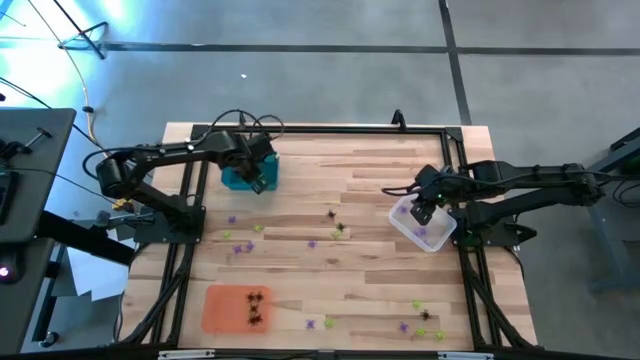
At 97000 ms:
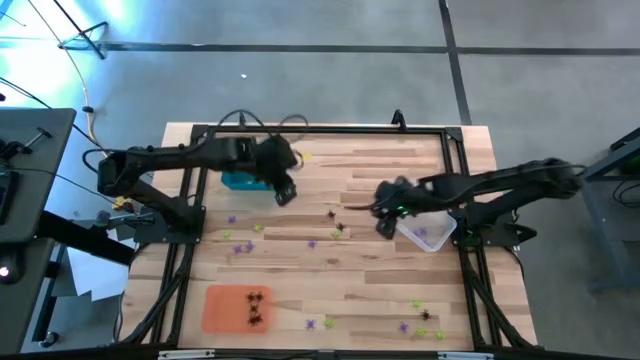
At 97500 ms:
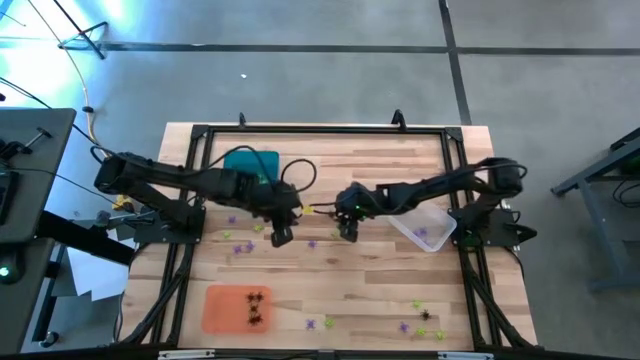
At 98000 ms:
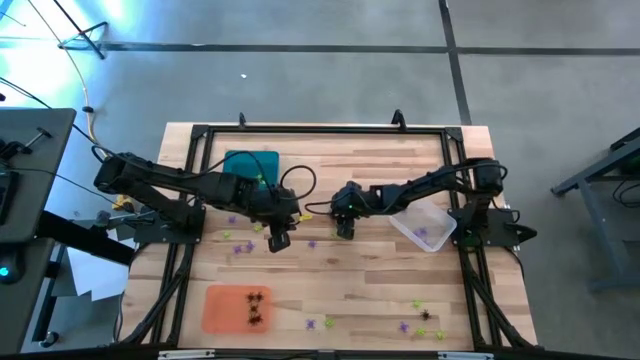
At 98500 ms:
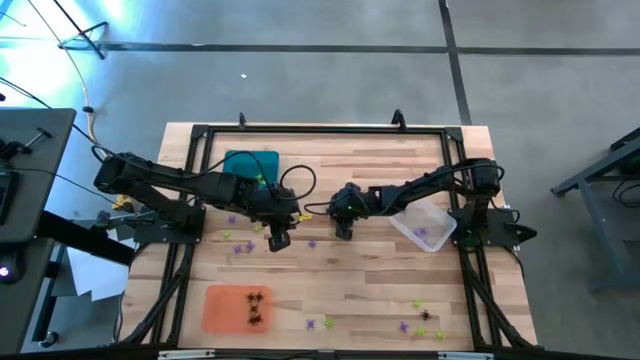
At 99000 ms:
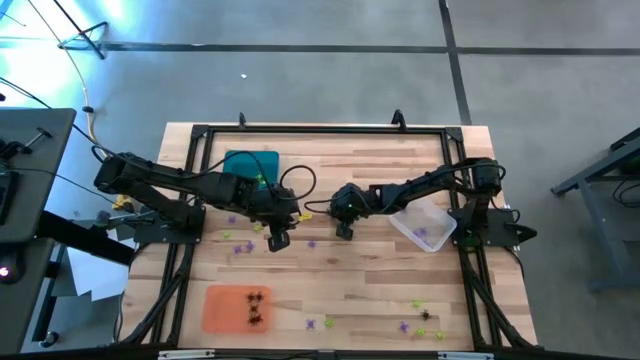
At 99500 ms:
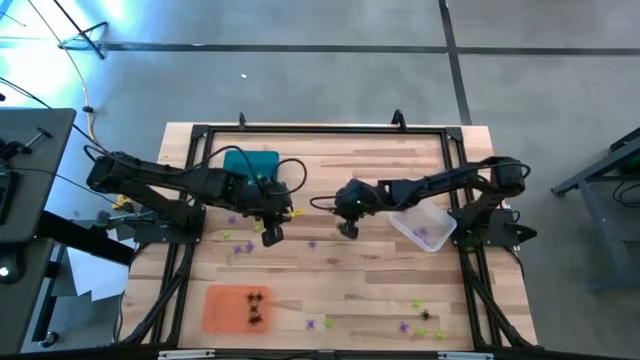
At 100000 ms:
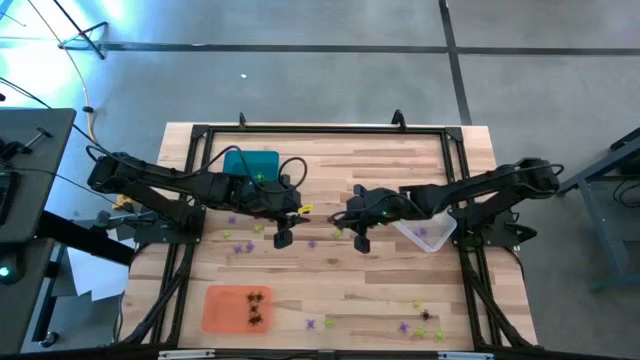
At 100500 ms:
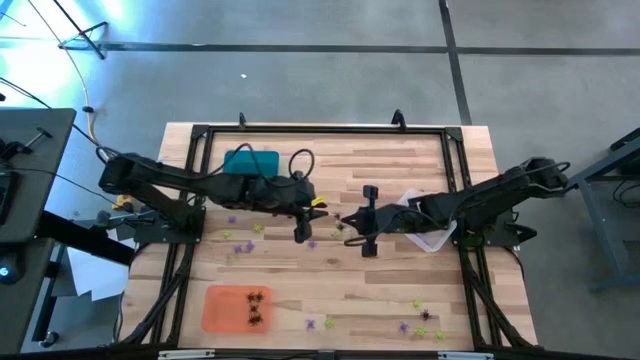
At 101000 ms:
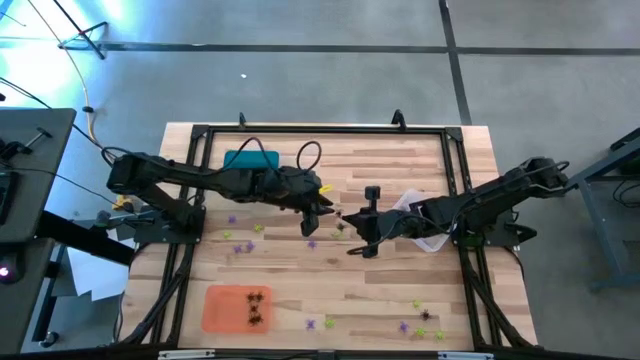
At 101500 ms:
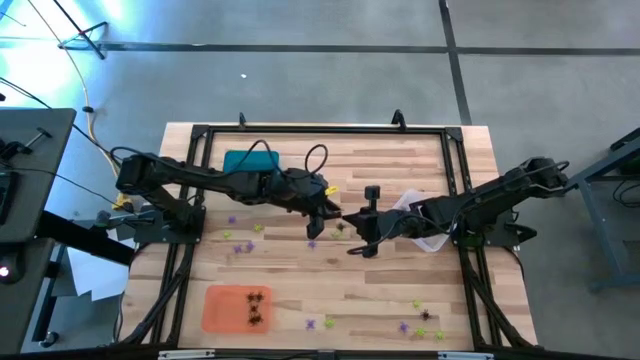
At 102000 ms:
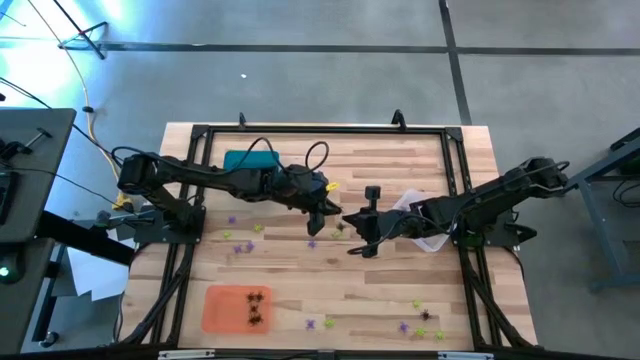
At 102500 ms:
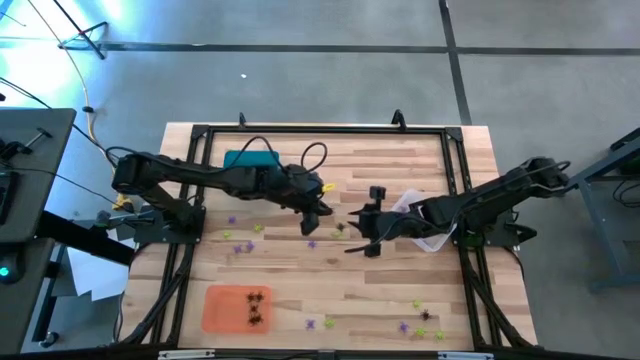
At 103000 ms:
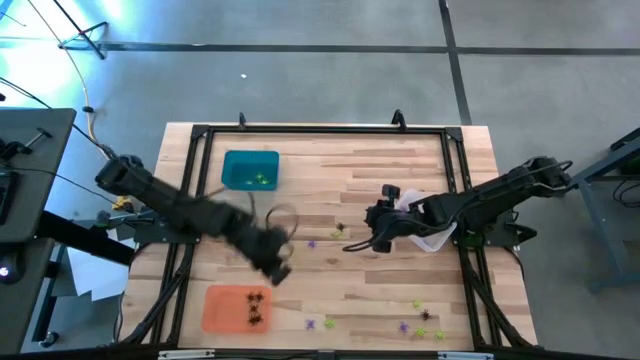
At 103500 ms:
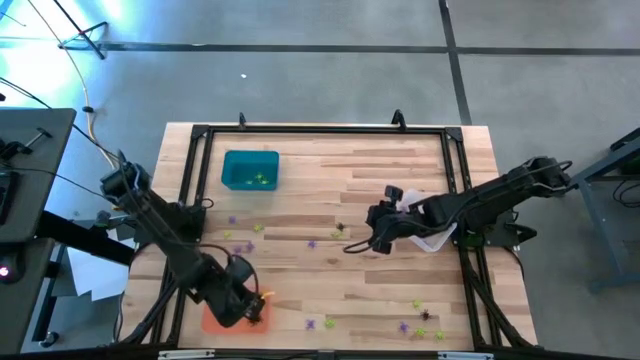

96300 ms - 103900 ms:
Task: Sort Halloween decoration
Put the black spider toy into the orange bin

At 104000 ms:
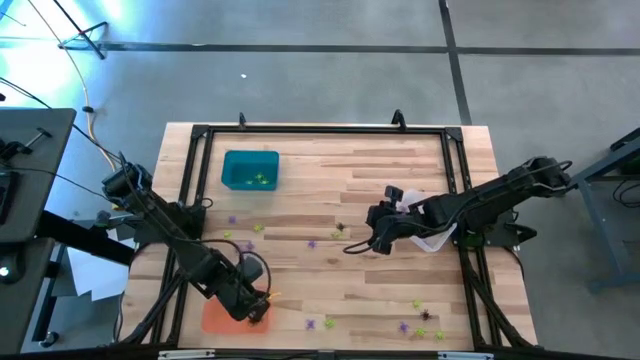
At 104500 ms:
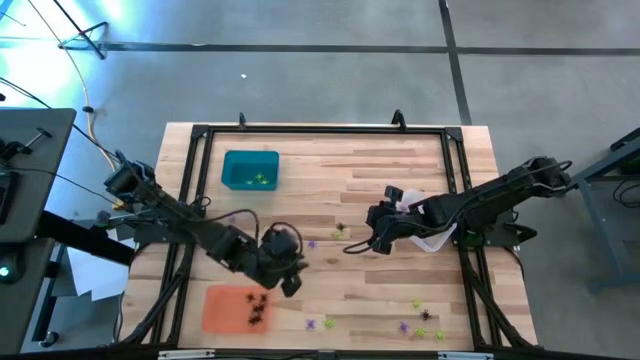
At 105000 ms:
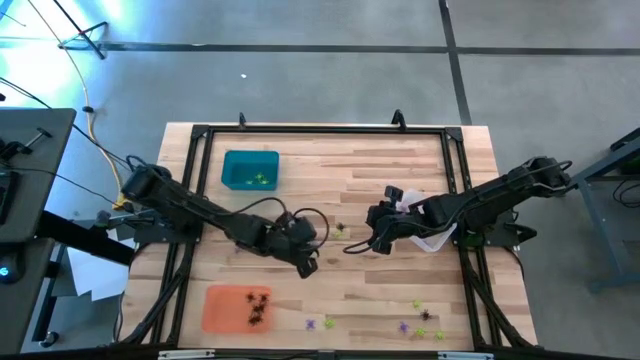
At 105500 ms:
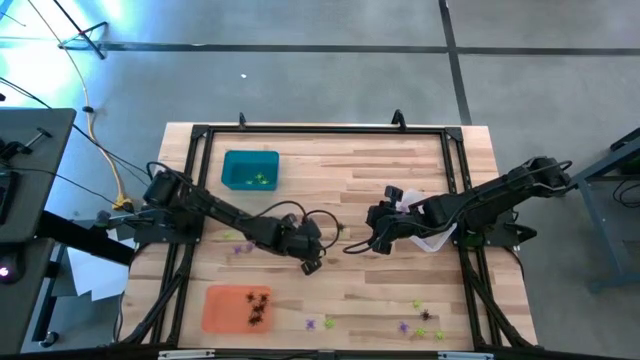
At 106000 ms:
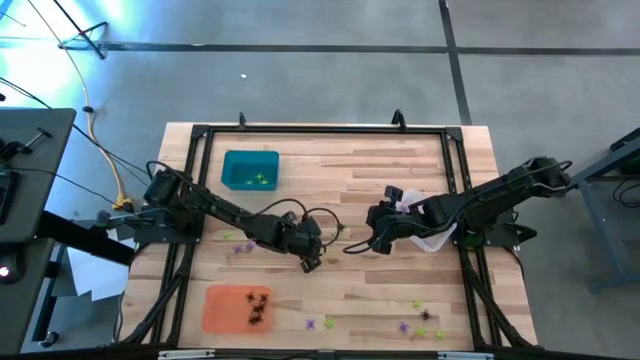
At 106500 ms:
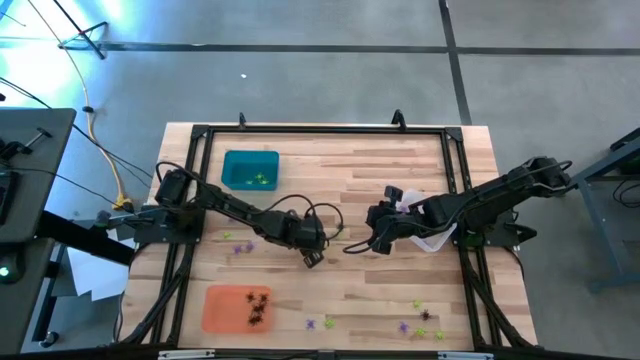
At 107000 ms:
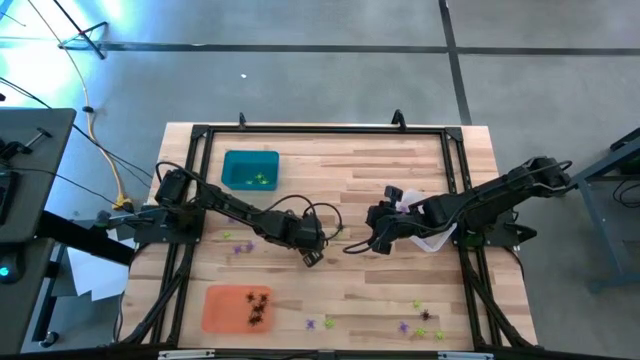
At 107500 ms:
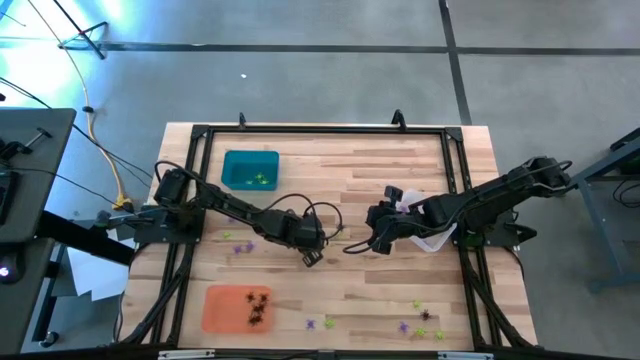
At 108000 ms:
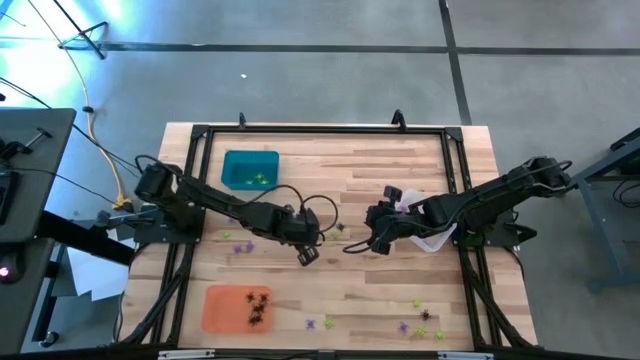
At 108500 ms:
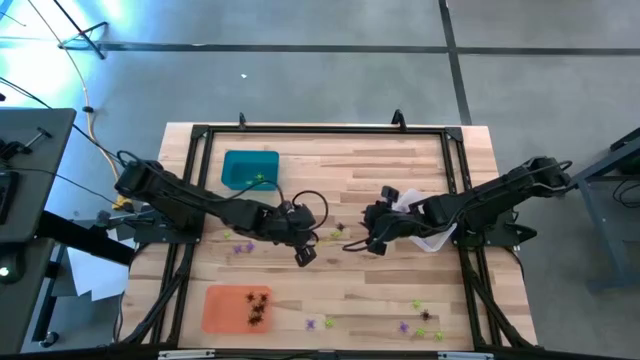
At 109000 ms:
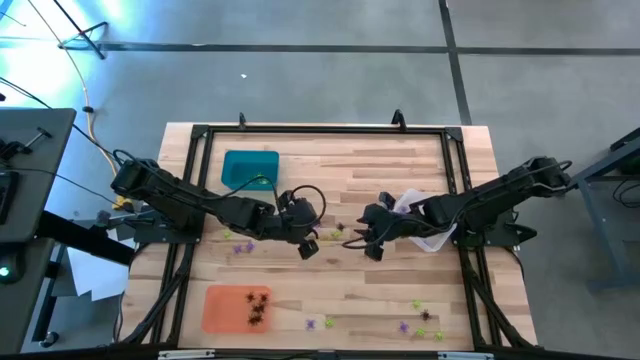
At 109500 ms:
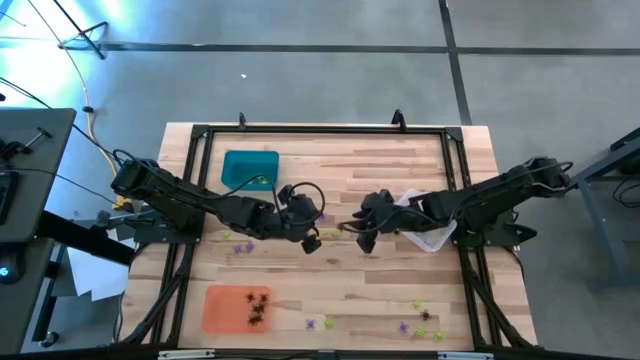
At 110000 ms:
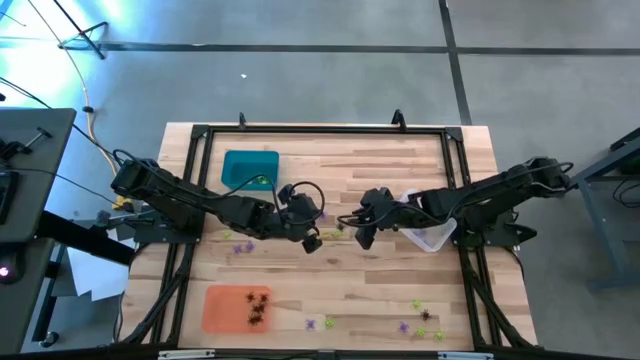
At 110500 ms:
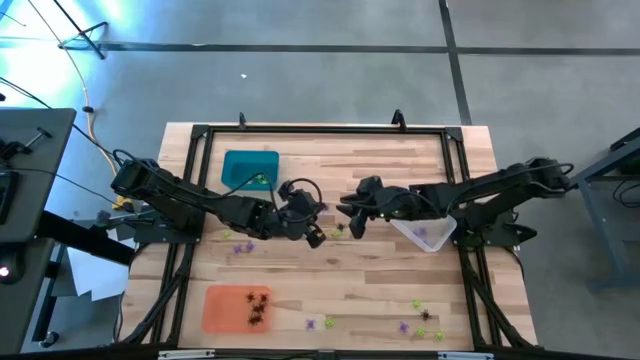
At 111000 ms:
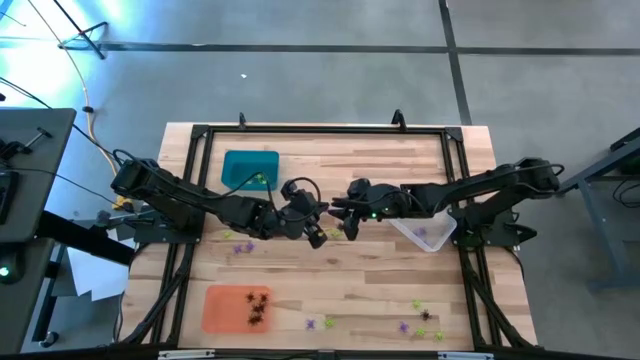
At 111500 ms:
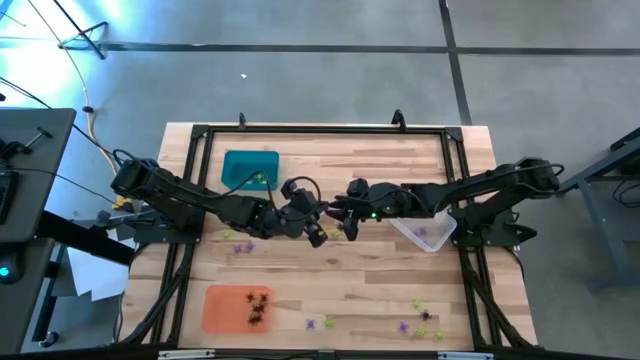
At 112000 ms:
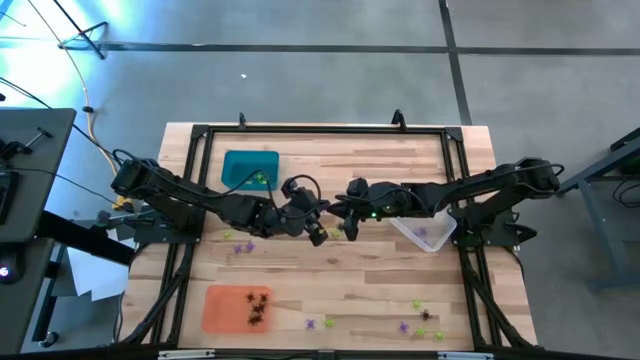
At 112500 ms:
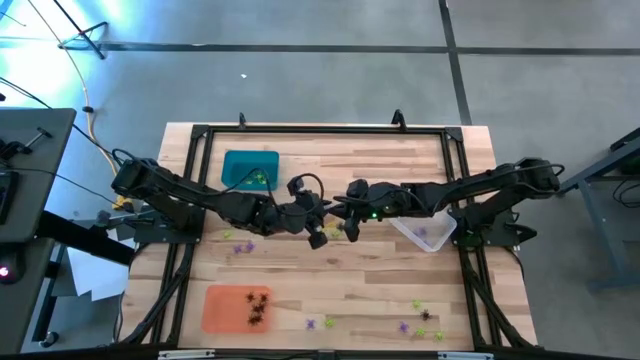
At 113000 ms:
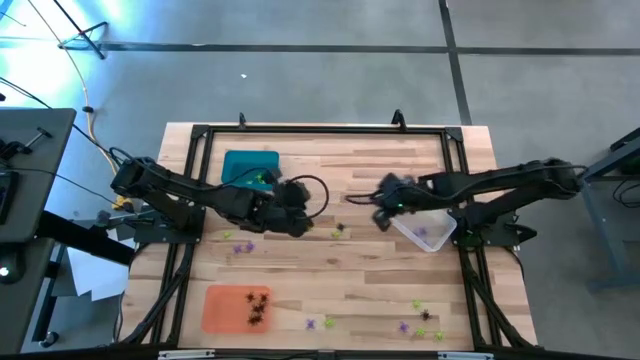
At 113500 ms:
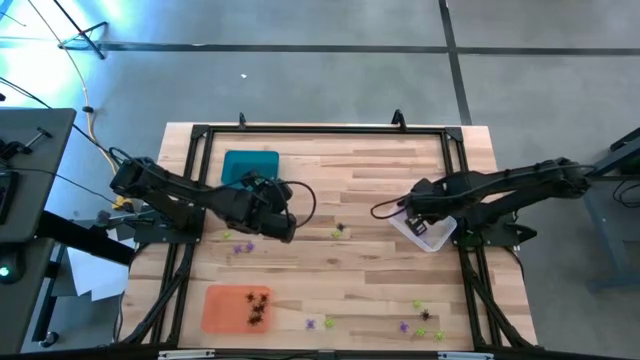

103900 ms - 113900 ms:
Put the violet spider toy into the transparent bin

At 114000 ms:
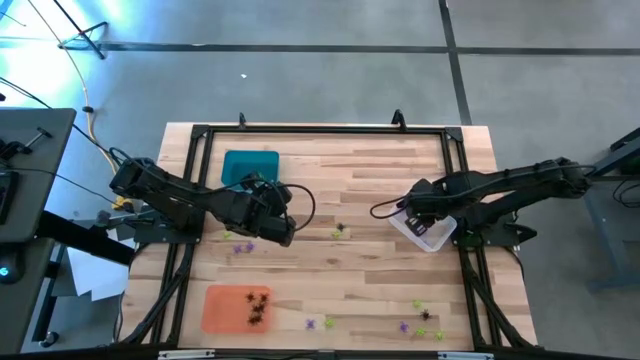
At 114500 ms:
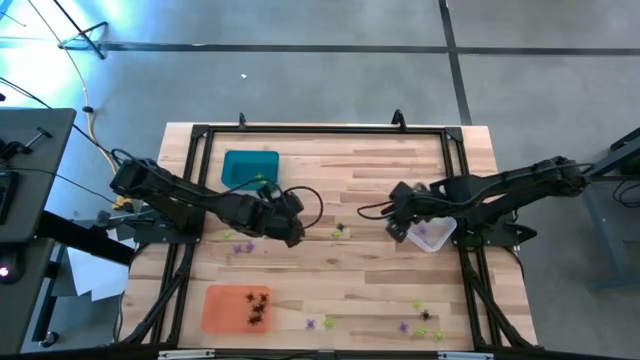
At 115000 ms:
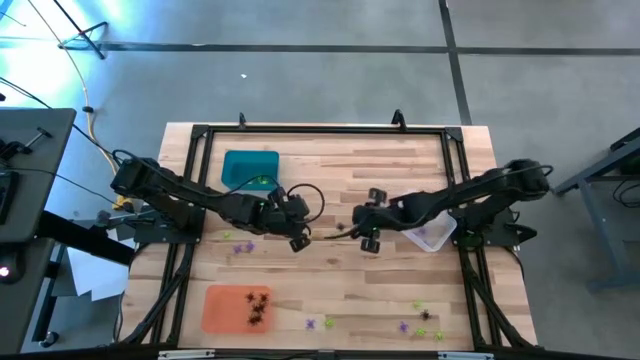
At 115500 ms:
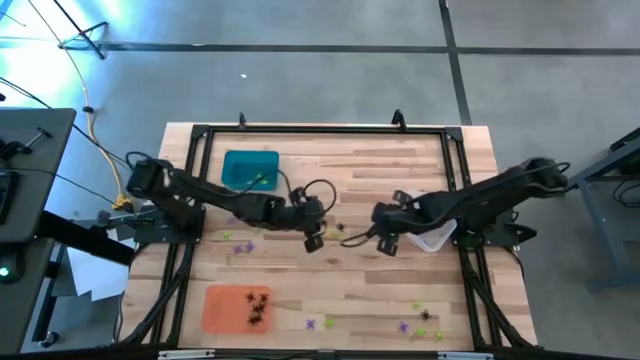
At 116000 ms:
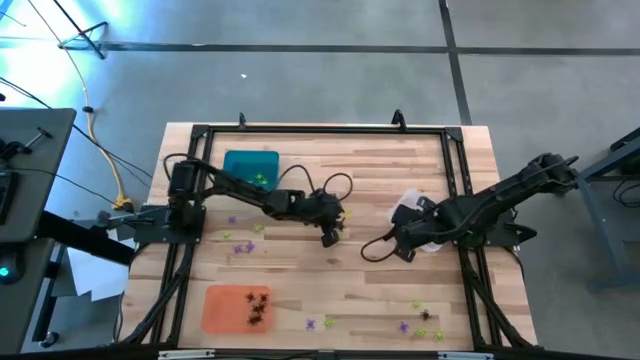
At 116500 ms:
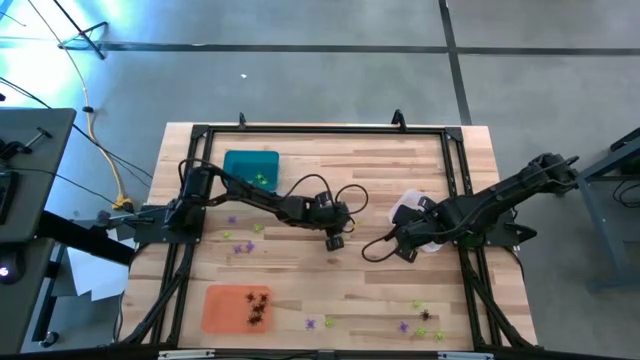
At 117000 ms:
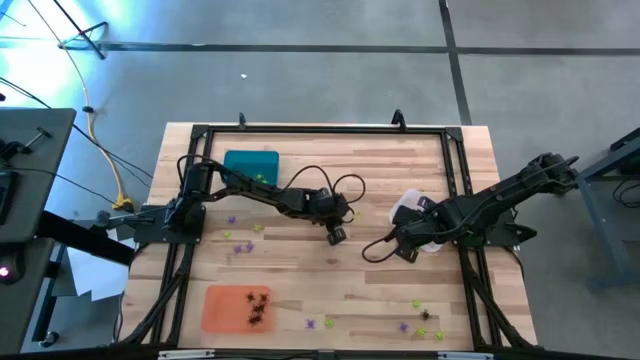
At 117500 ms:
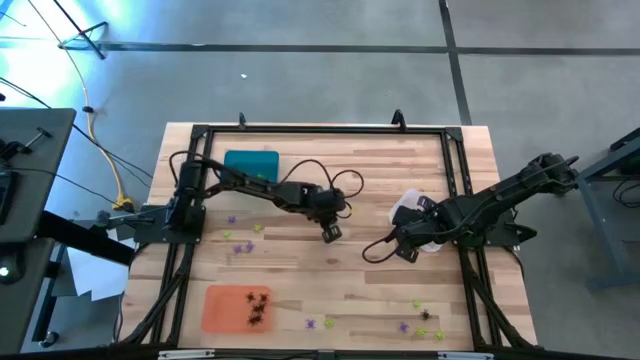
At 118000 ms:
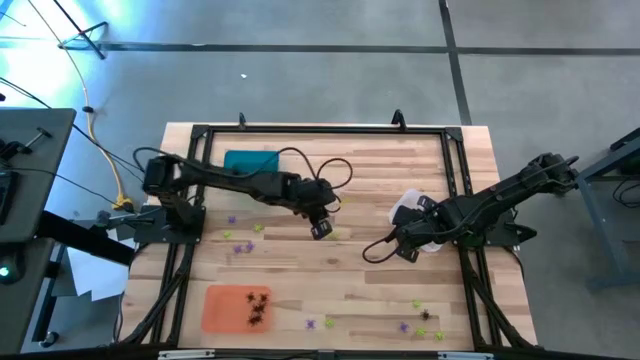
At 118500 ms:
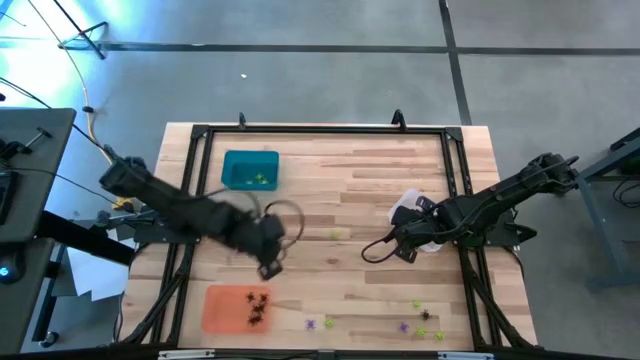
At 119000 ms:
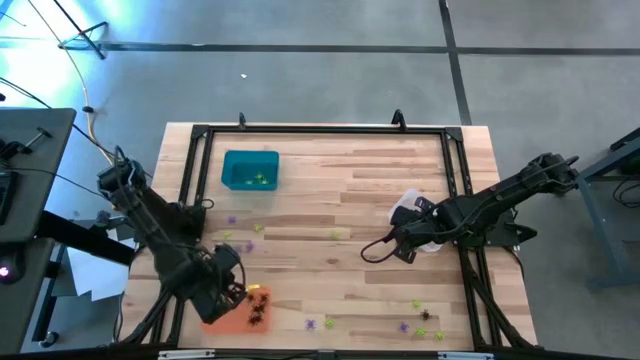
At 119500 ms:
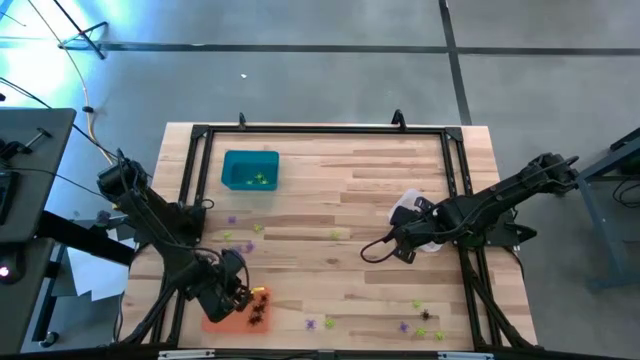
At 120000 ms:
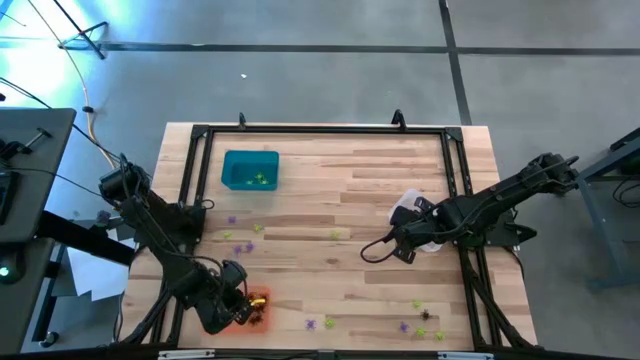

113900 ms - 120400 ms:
Put the black spider toy into the orange bin
